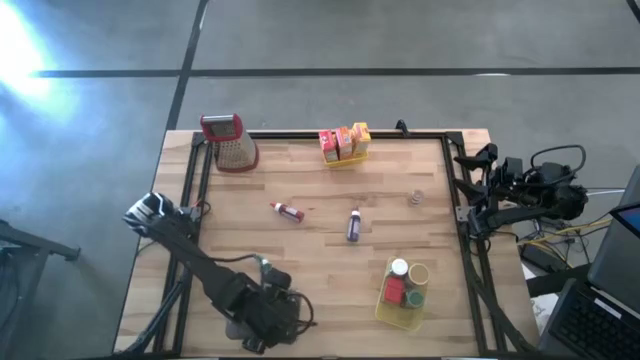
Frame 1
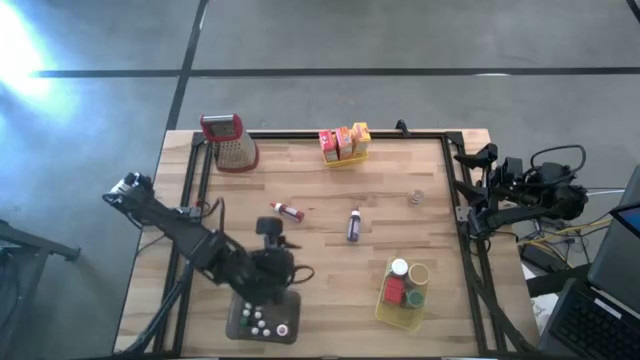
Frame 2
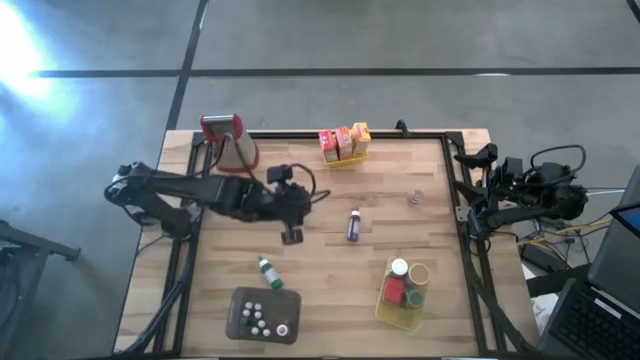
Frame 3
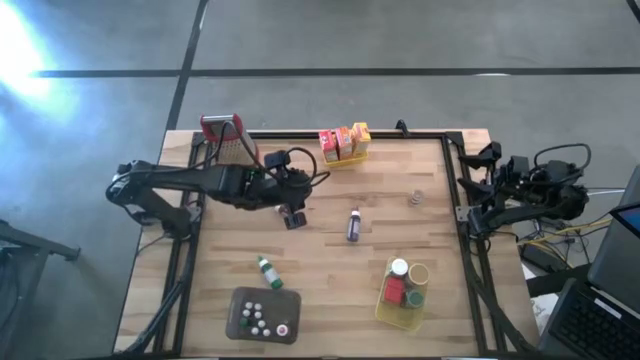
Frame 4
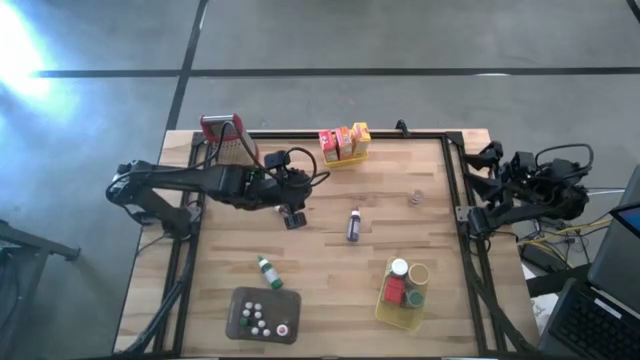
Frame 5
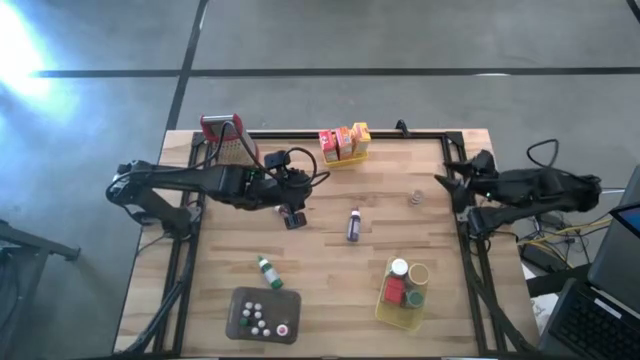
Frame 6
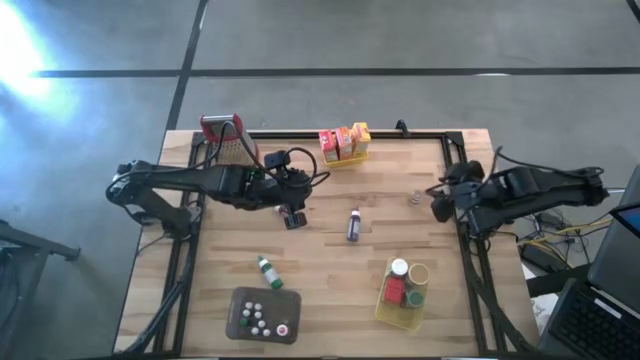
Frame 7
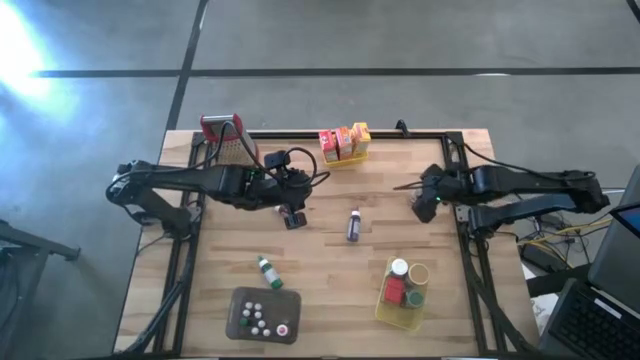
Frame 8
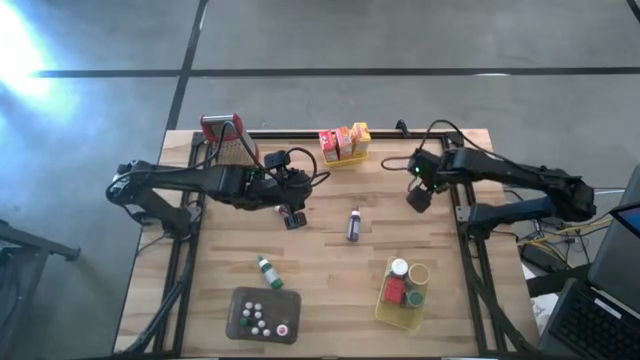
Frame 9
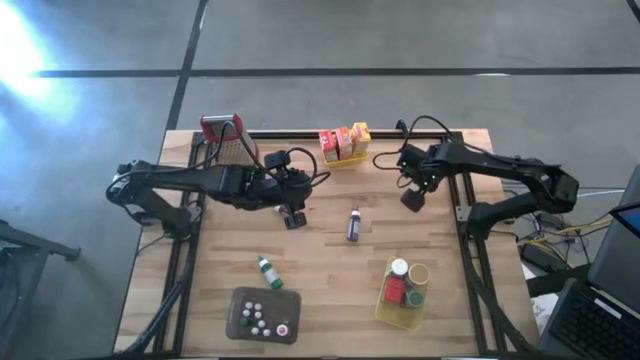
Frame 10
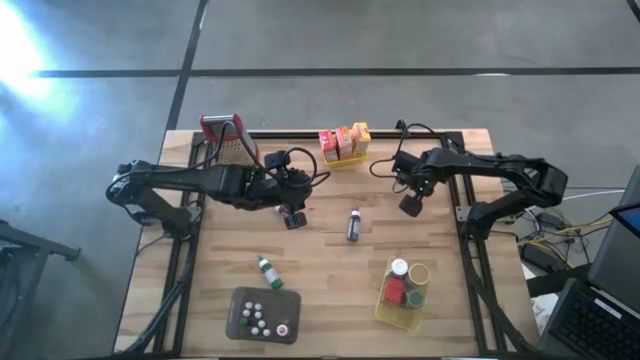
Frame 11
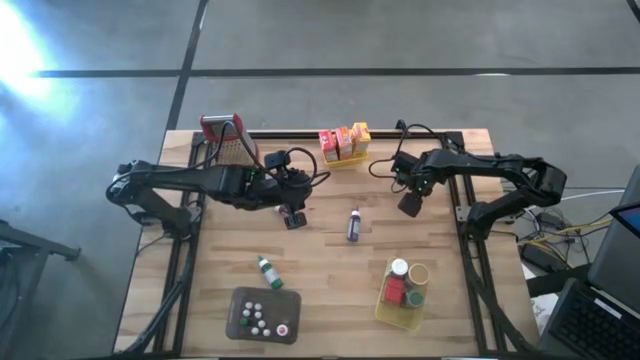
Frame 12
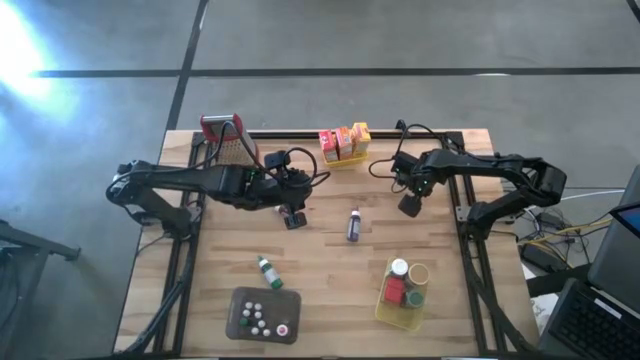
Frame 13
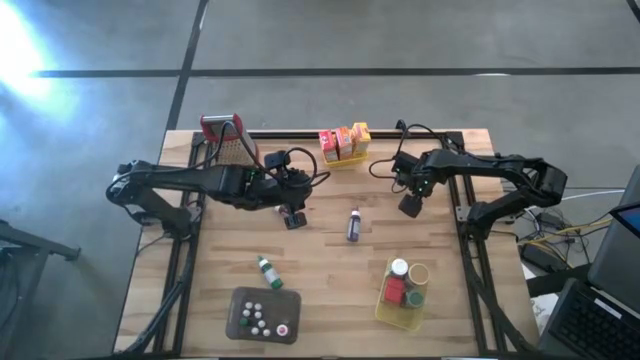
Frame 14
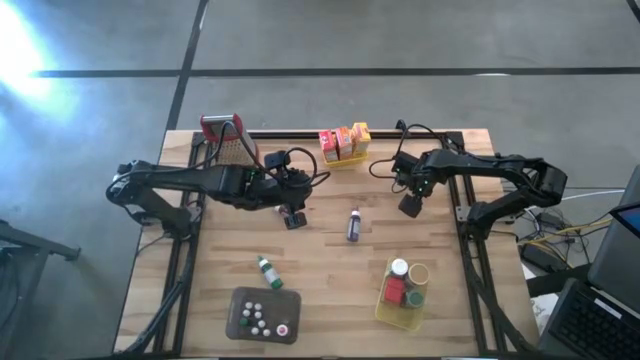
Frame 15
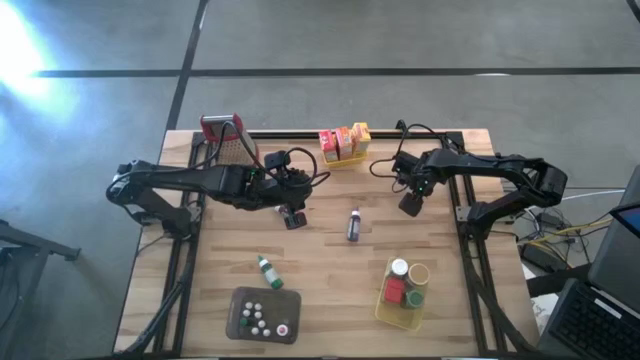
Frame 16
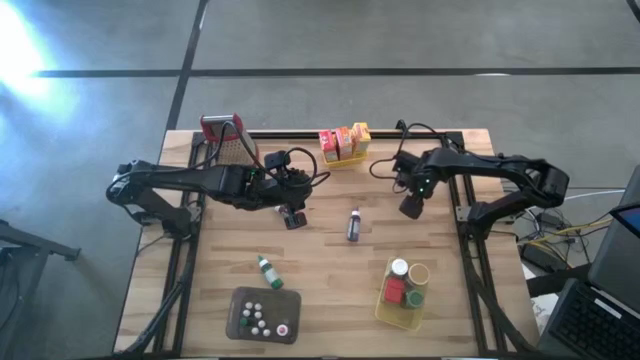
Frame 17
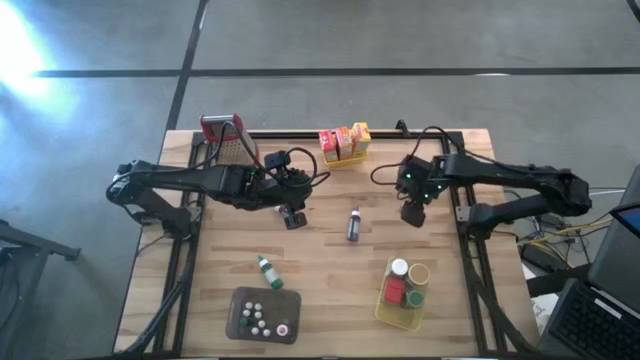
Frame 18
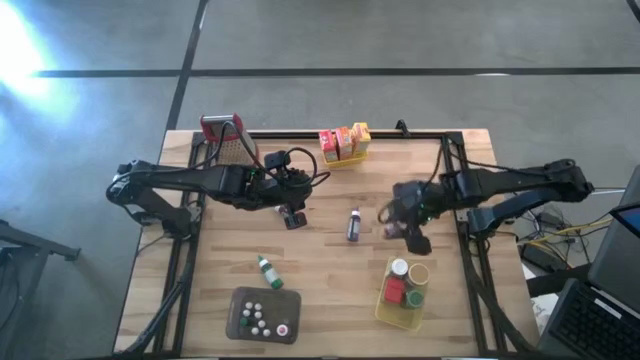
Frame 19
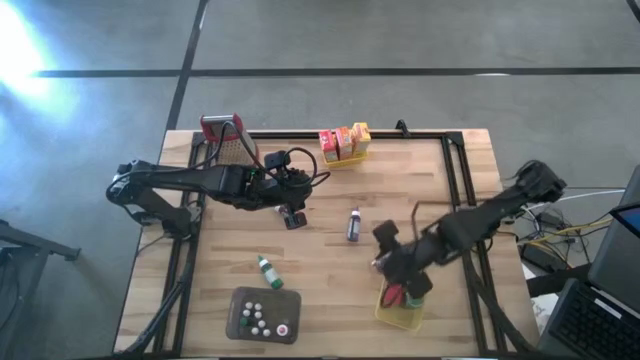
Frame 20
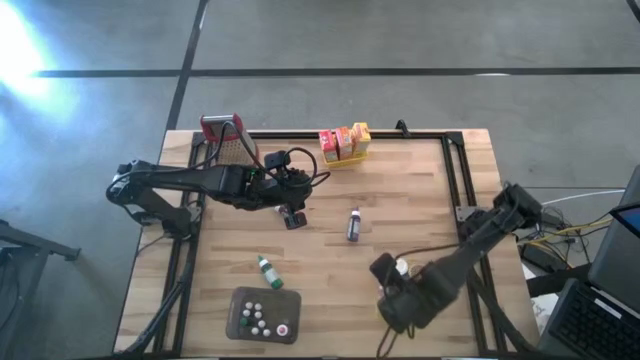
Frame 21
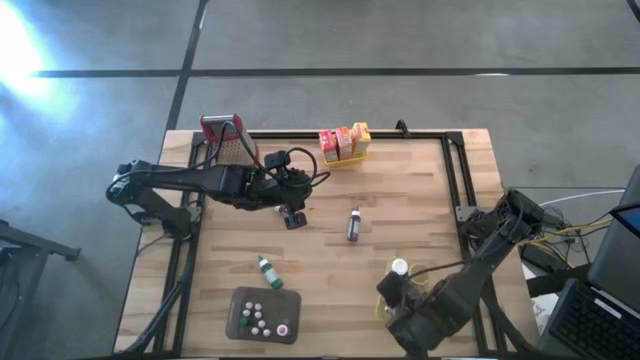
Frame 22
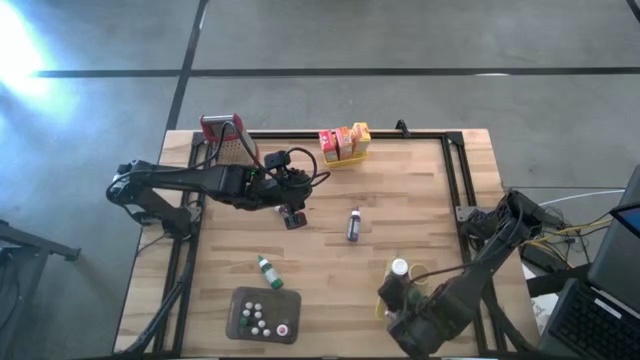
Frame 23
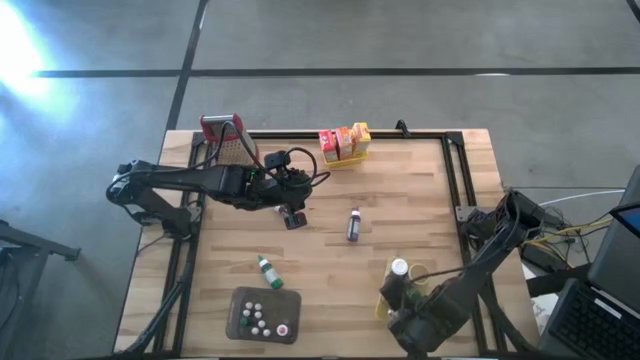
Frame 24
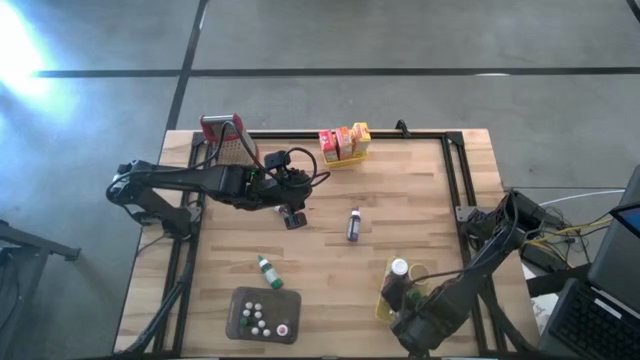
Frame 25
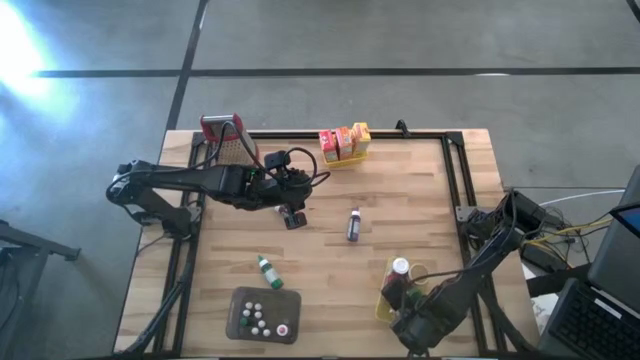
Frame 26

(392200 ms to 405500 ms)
Task: Pick & Place Kitchen Items
Put the transparent seasoning bottle into the bottom yellow bin

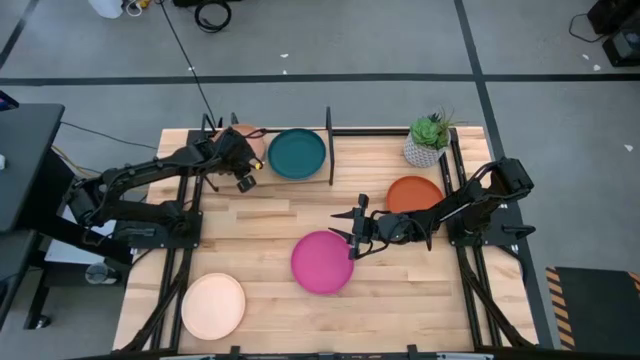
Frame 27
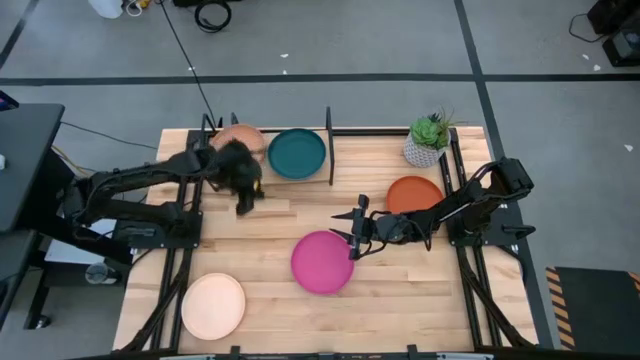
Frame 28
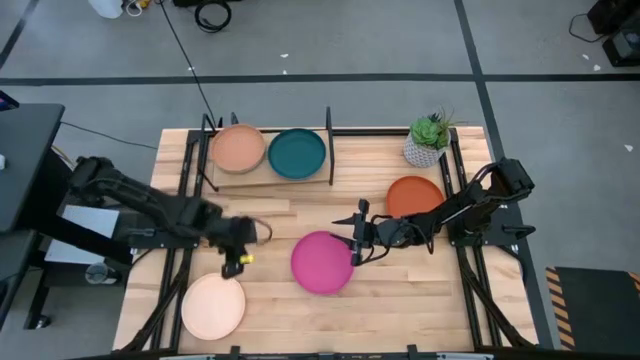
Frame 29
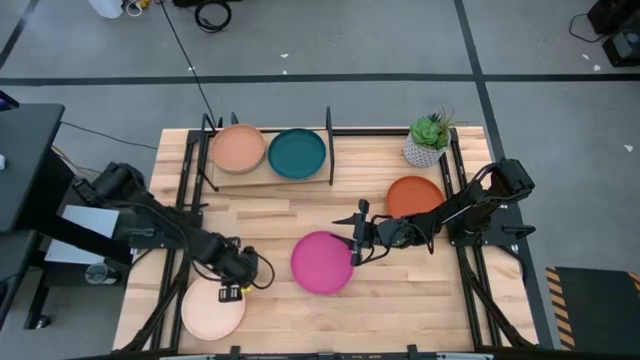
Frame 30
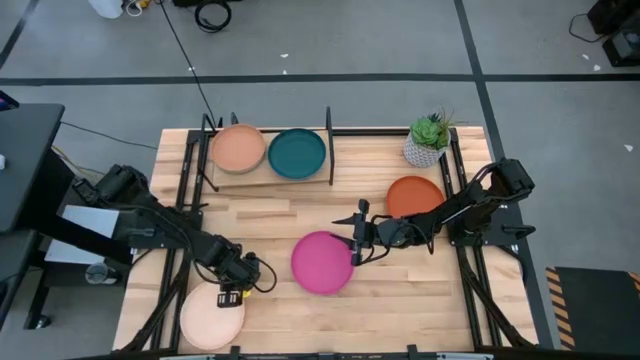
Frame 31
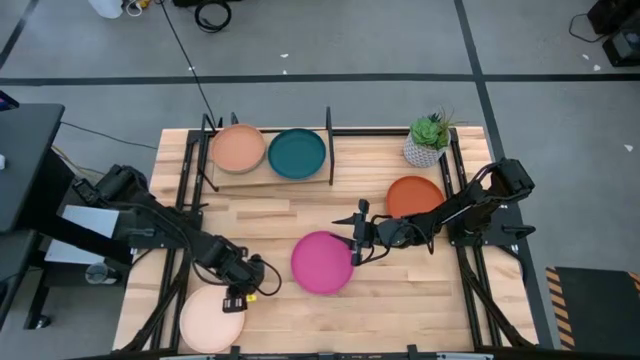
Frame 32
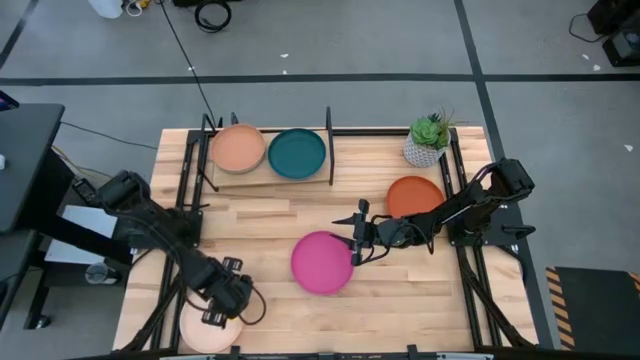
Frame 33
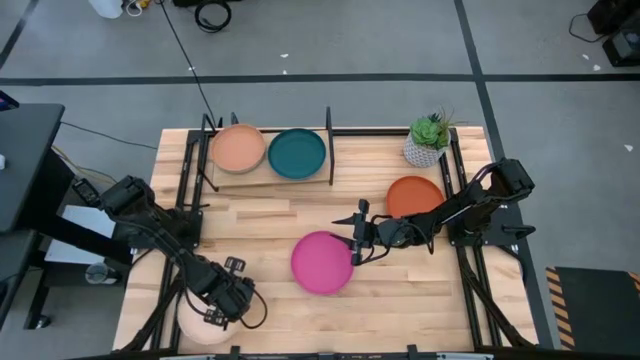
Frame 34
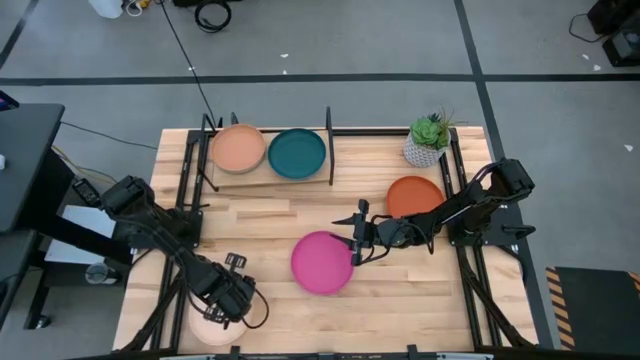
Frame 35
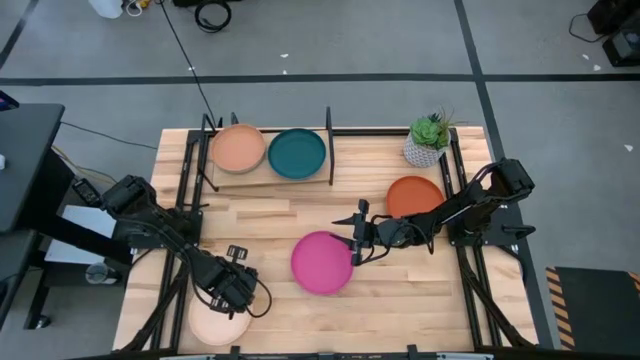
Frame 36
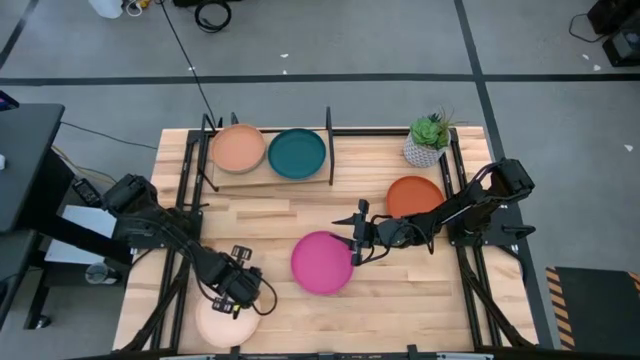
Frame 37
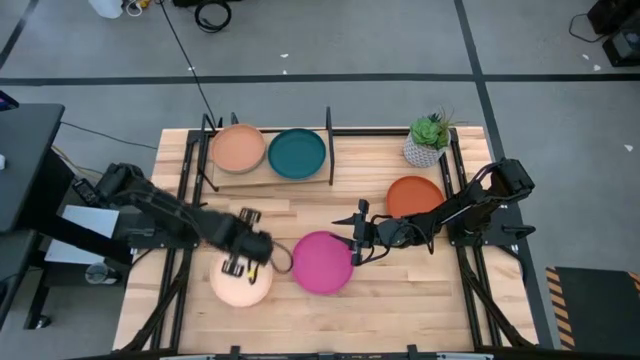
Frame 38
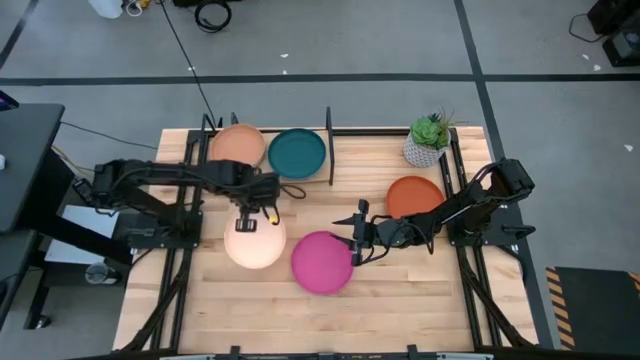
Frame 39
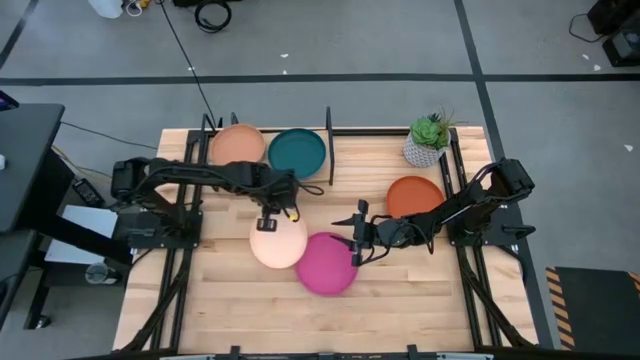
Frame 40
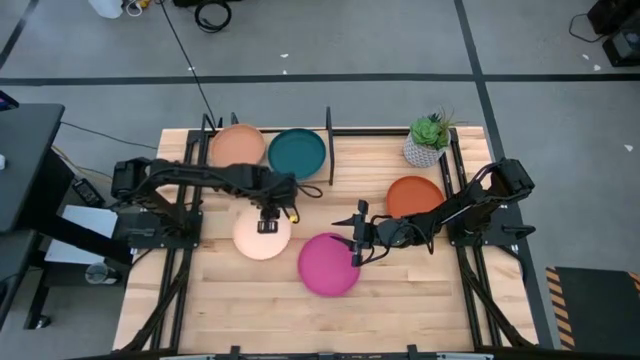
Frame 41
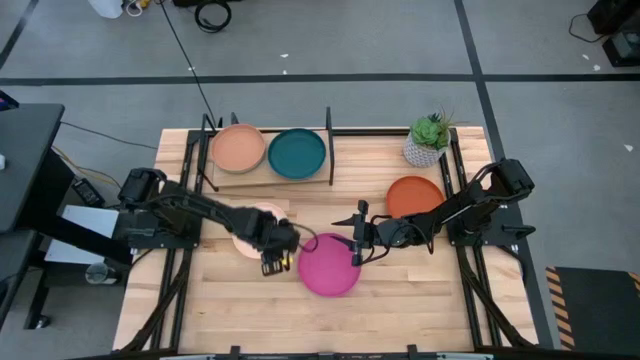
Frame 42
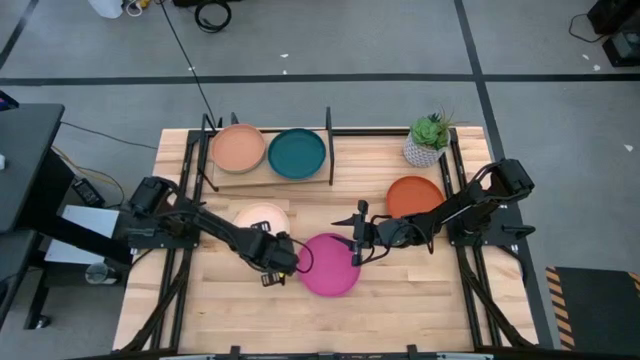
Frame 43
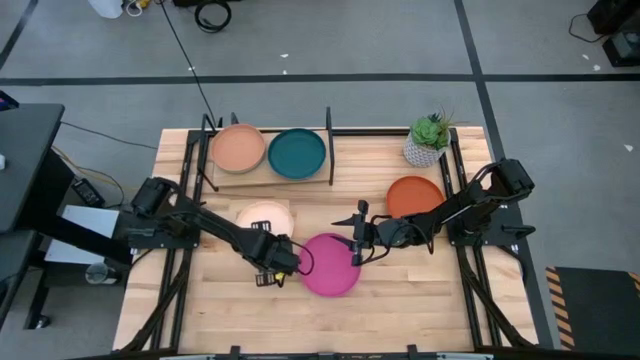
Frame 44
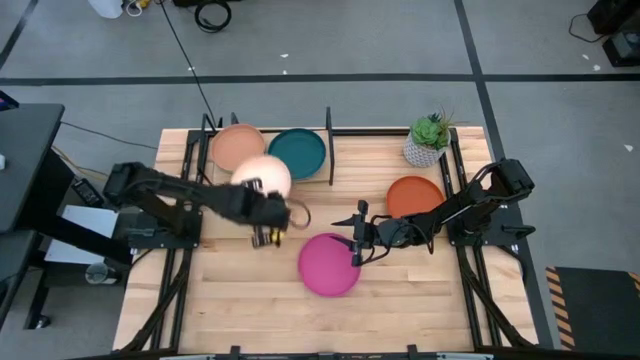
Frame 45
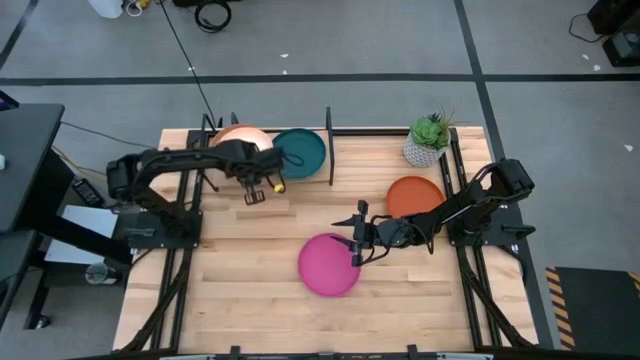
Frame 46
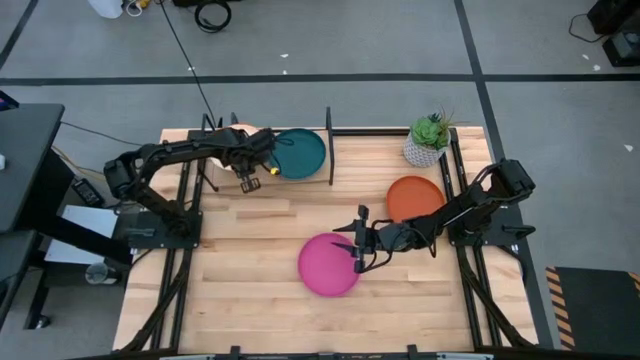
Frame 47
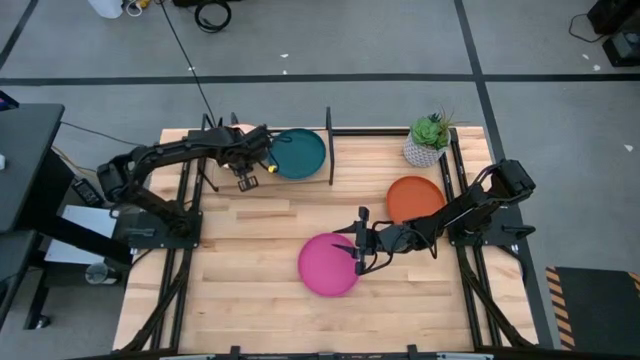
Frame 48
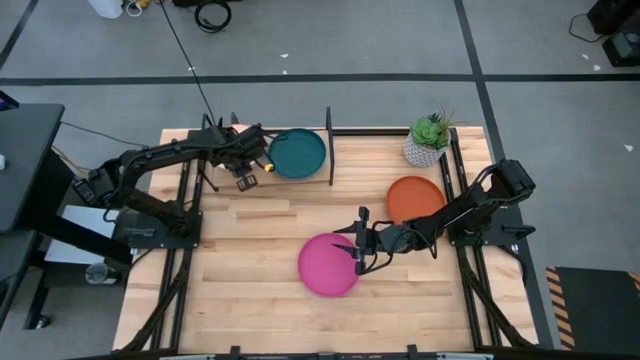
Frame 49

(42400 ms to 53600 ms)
Task: Place and stack plates onto a shelf
Stack the white plate on top of the brown plate on the shelf
